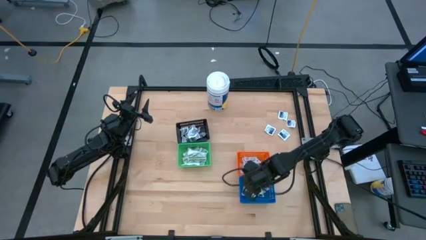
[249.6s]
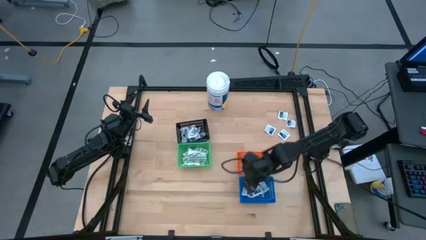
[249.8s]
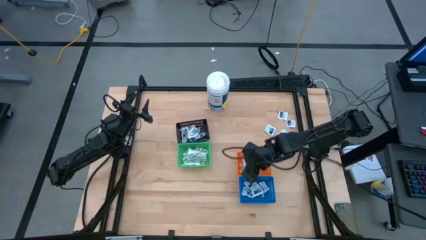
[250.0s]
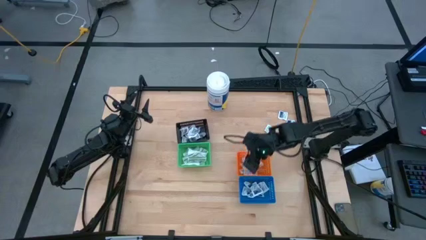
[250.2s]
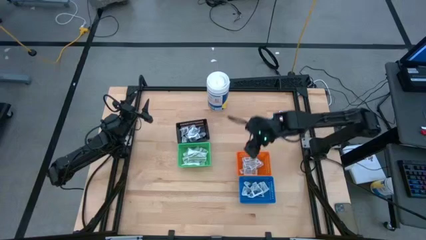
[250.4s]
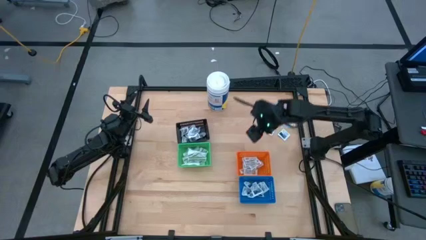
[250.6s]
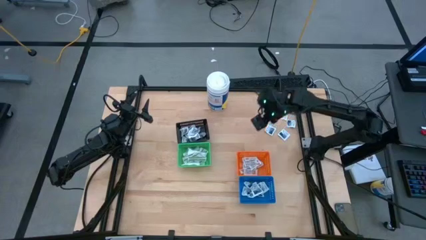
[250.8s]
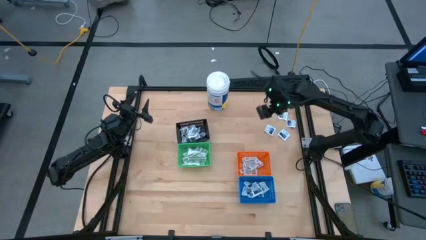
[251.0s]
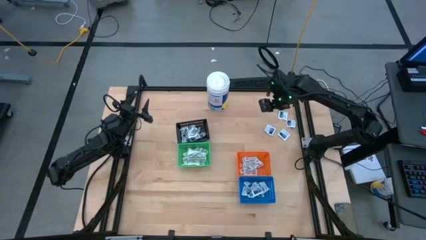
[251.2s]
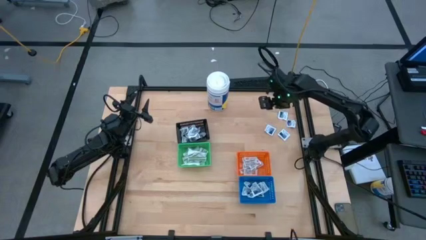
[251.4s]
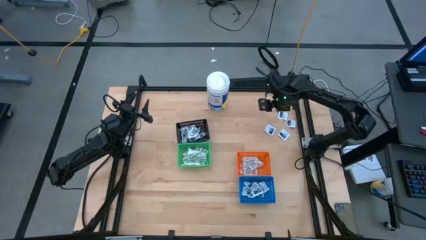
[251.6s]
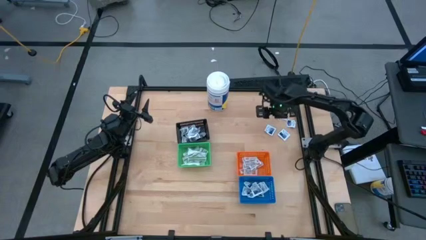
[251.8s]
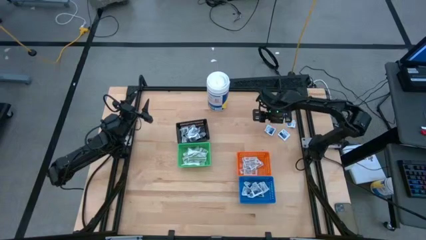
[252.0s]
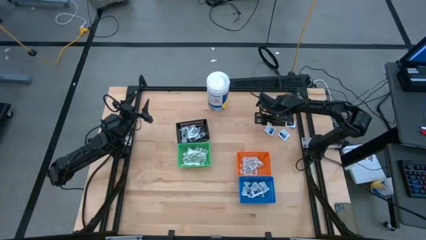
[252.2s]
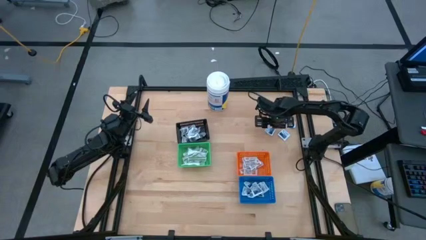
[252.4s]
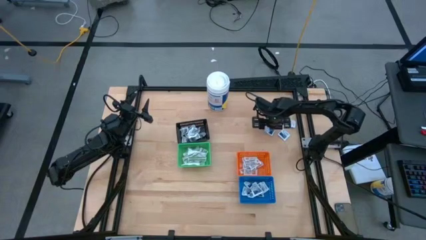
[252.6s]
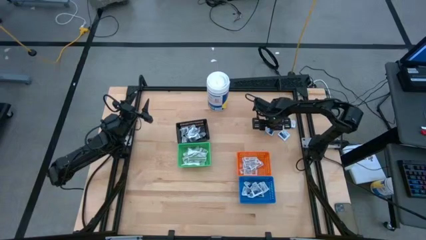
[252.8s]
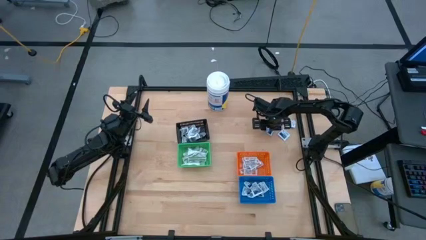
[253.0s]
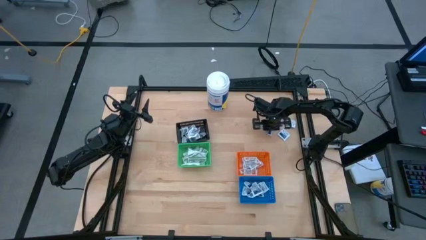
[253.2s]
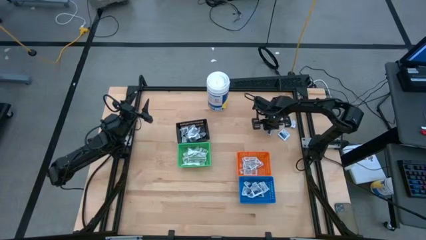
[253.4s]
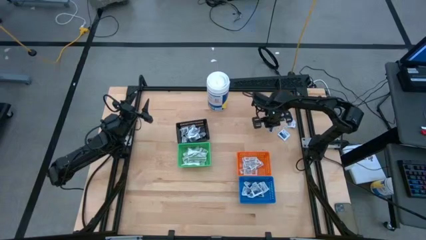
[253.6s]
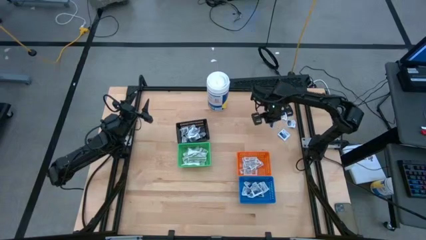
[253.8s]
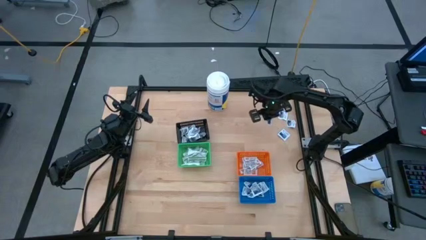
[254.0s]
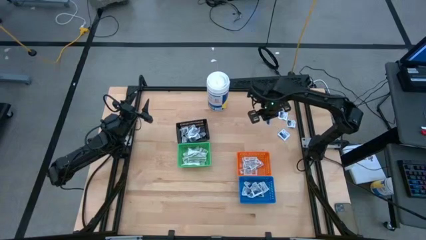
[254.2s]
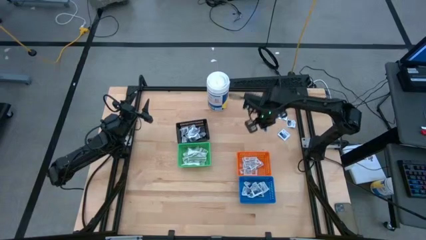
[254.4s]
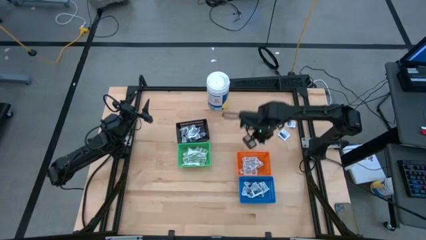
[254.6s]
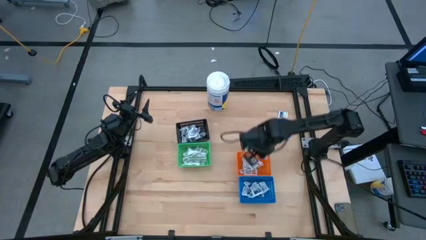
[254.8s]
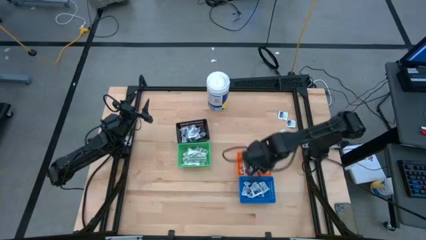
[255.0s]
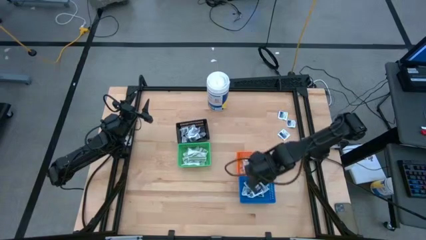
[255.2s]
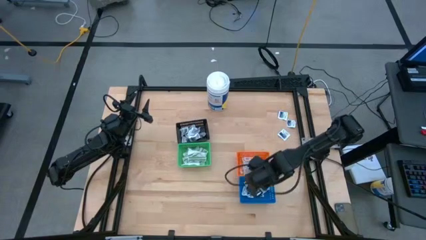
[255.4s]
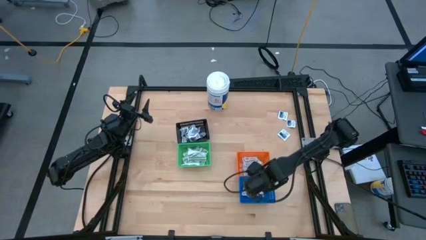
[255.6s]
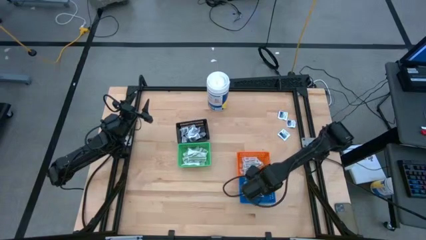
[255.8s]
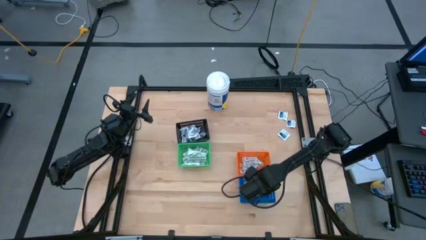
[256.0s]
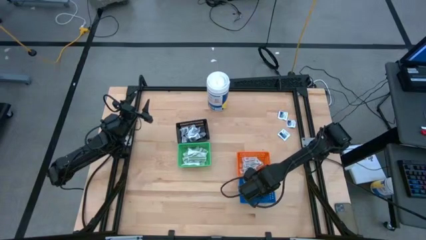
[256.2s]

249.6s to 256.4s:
Task: Pick & Place First Aid Supplies
Put the blue pad into the blue bin

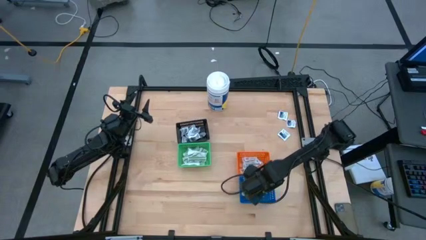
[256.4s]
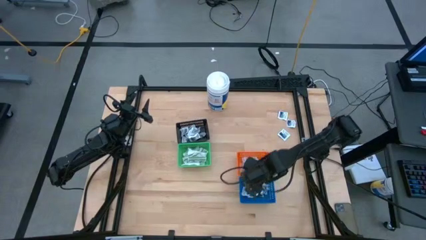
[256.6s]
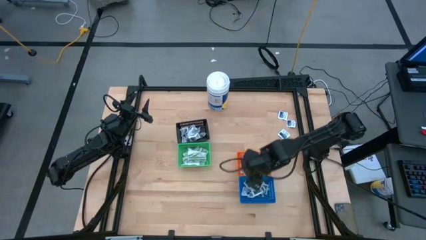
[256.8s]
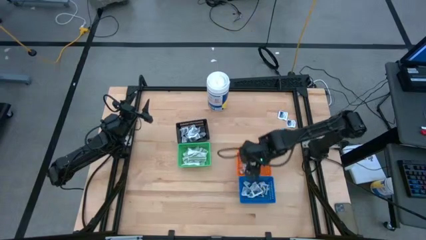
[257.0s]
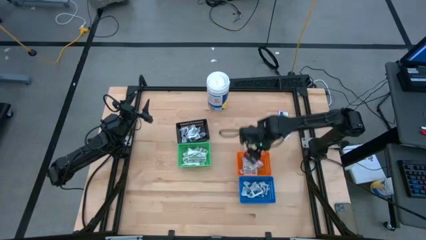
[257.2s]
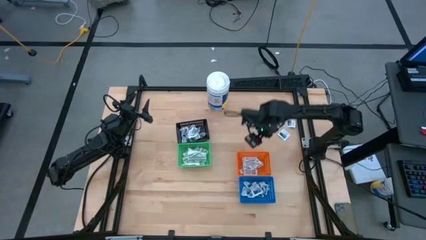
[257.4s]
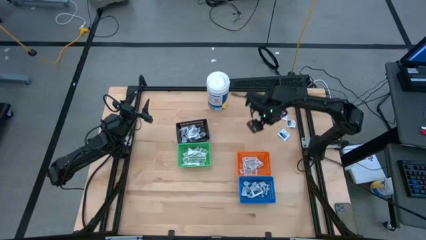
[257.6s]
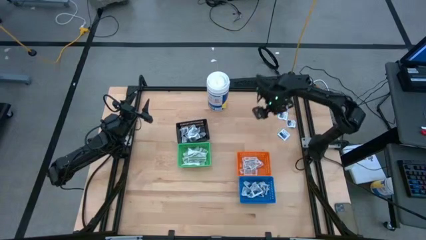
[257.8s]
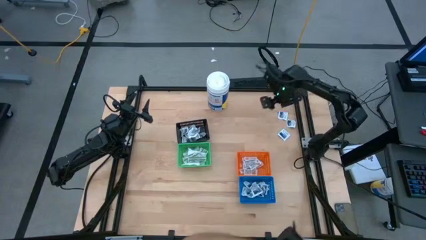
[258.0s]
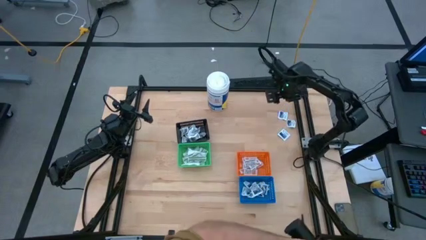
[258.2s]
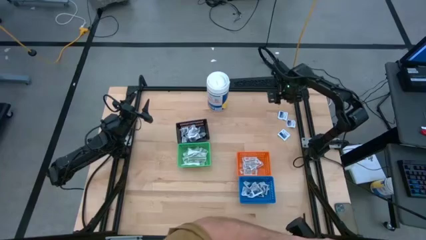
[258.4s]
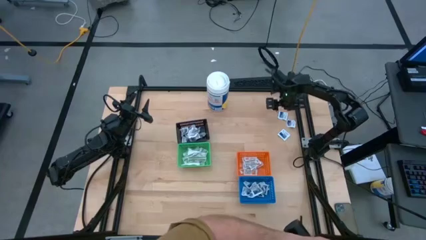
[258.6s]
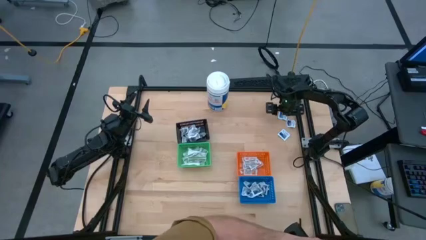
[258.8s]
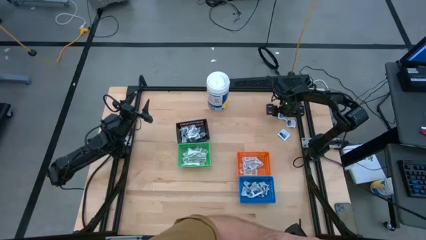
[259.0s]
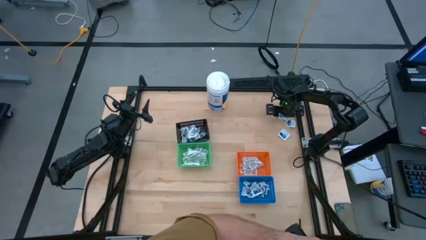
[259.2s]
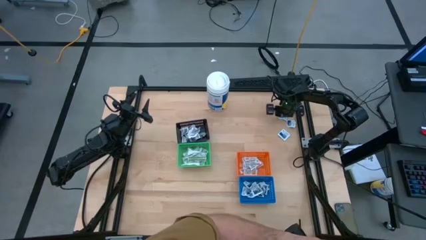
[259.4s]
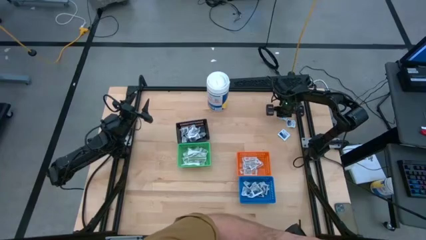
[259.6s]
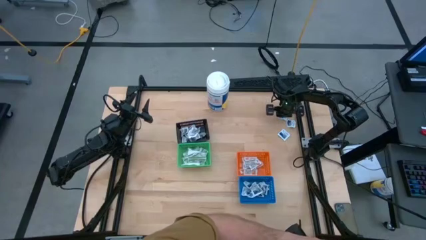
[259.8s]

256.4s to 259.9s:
Put the blue pad into the blue bin

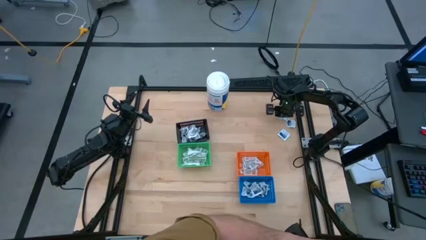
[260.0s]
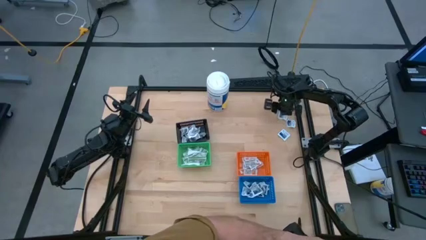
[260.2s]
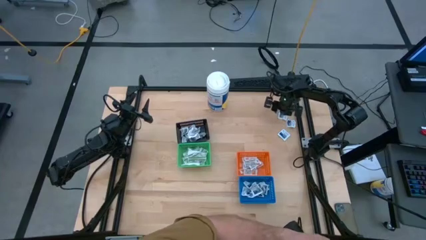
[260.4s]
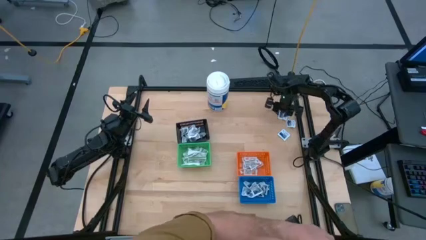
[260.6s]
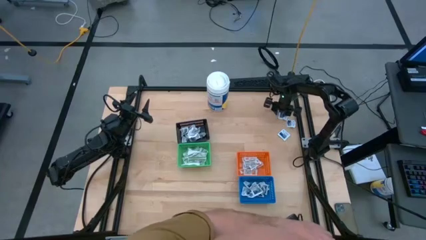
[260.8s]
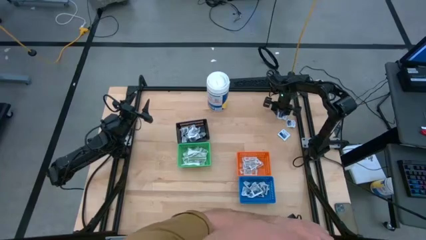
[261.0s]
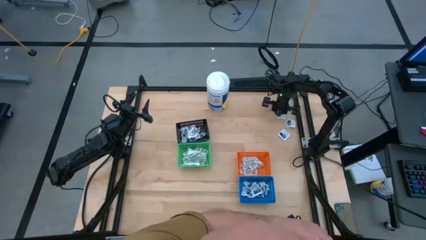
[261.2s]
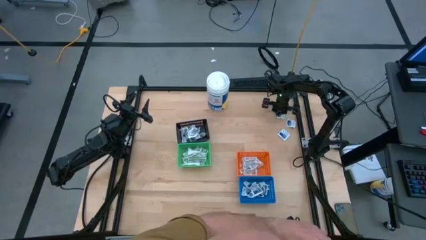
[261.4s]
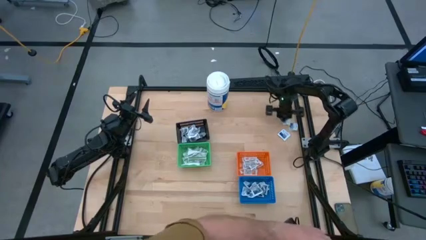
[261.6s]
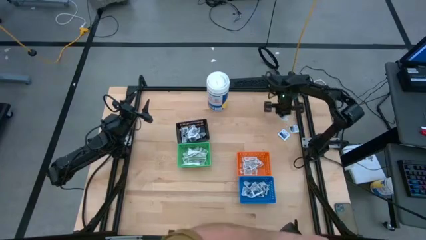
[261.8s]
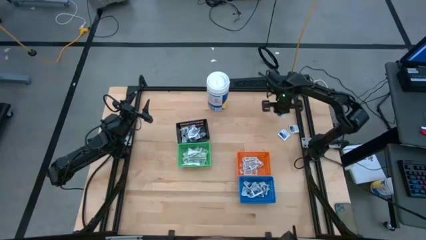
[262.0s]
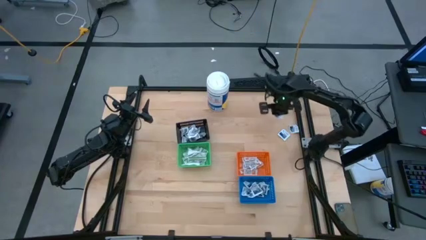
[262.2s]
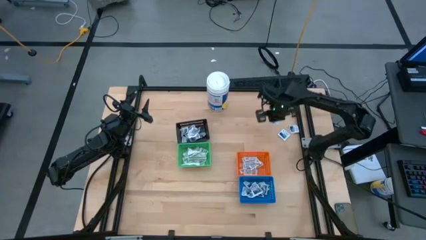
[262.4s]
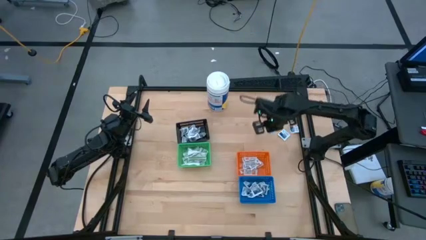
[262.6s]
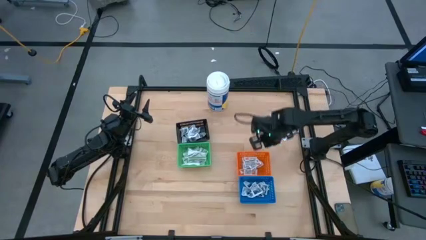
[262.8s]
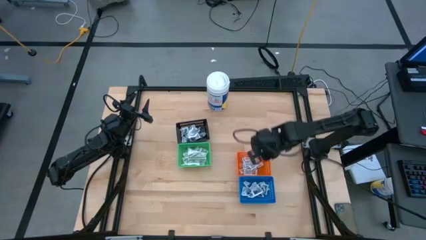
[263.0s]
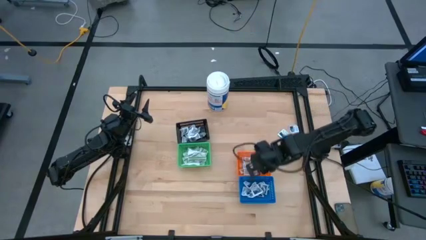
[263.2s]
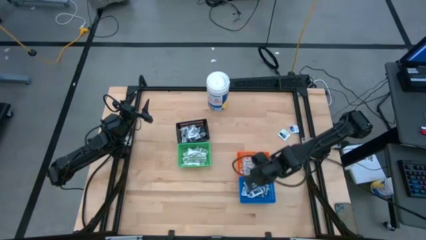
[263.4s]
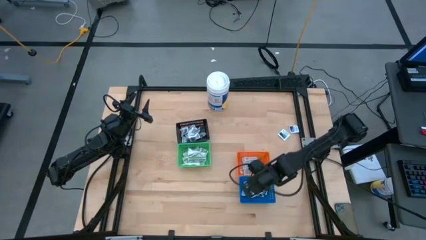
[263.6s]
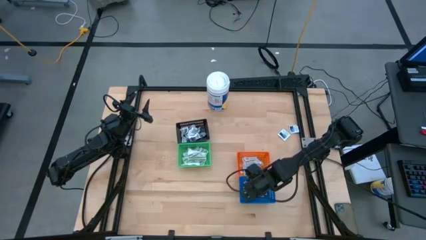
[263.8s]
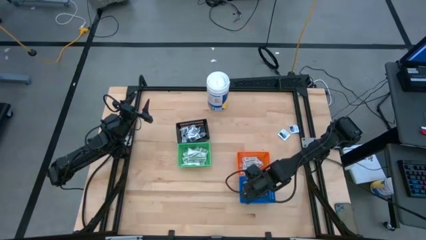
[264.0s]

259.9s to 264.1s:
Put the blue pad into the blue bin

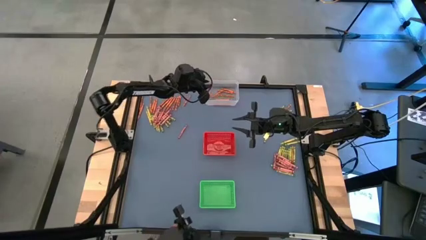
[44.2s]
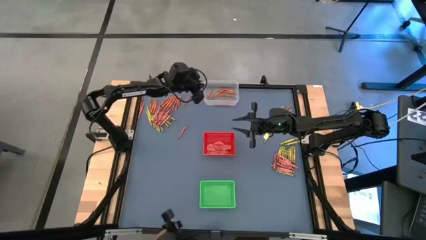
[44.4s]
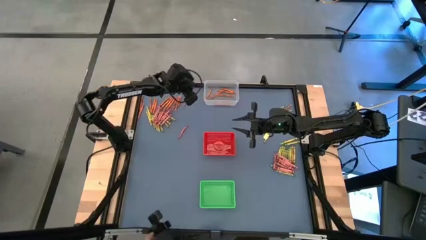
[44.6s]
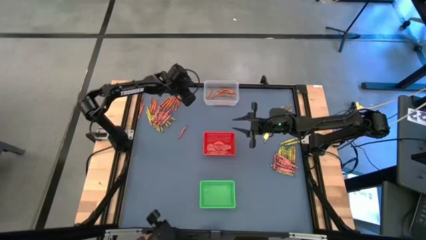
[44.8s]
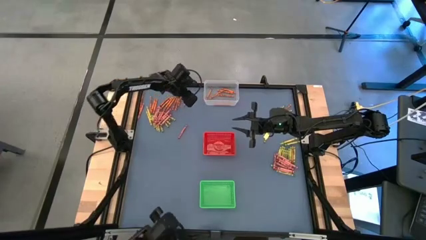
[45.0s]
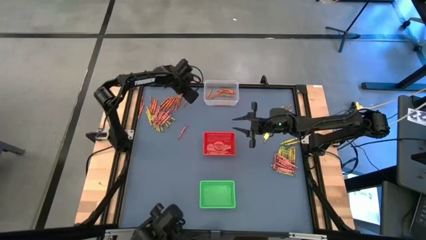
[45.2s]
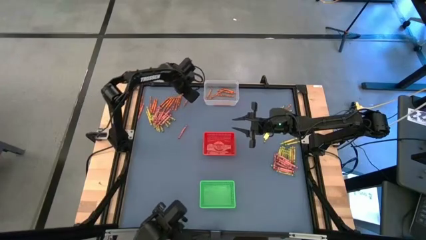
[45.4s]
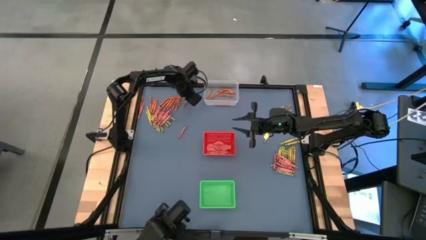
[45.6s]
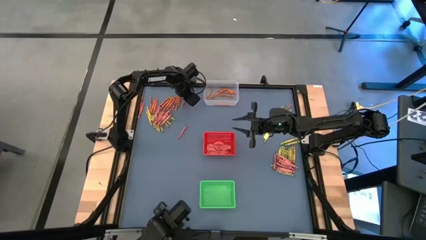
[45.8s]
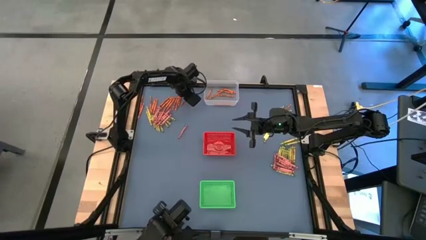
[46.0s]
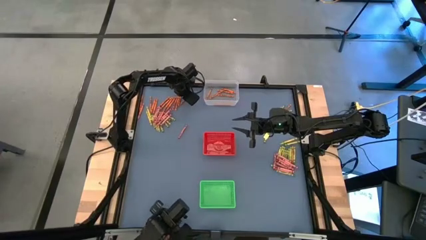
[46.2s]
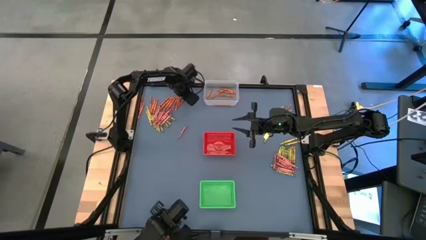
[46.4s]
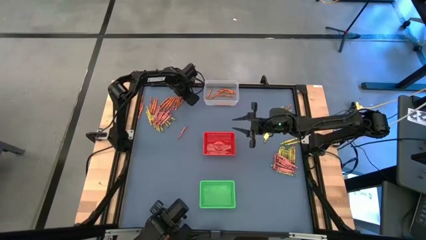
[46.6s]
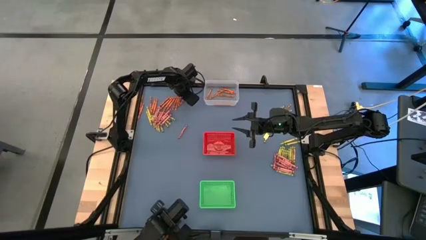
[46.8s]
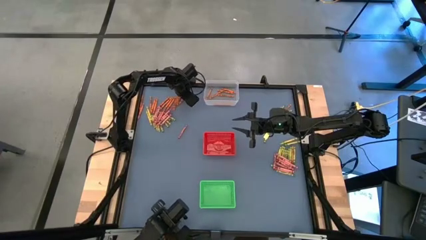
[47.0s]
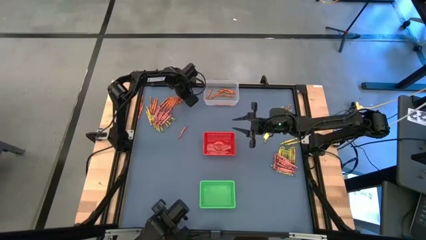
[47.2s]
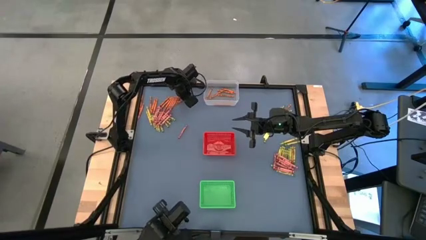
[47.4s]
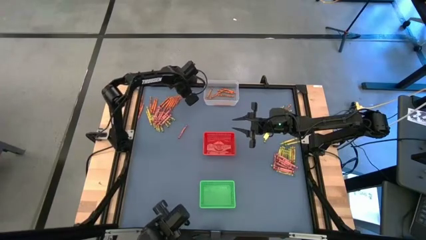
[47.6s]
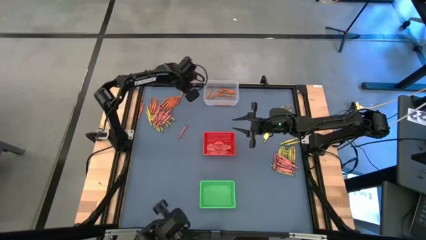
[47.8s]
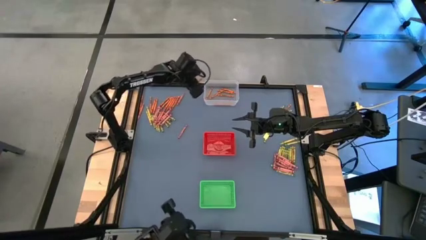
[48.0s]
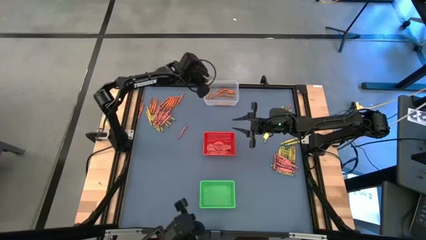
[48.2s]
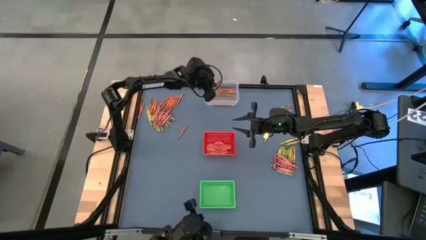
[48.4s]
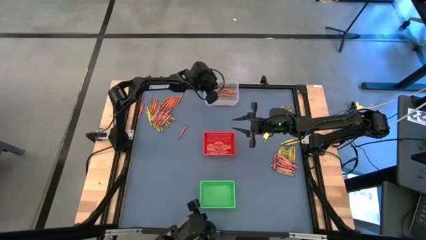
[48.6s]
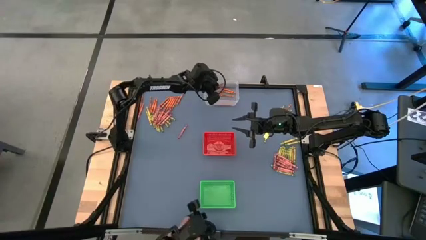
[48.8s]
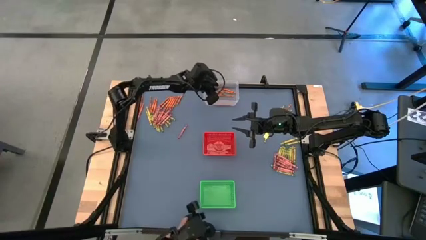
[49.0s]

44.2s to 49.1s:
Task: Sort crayons
Put the orange crayon into the transparent bin
